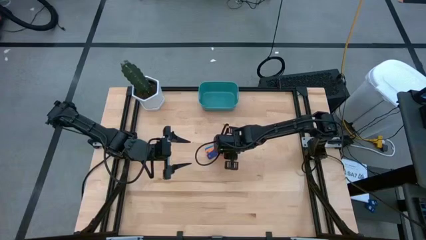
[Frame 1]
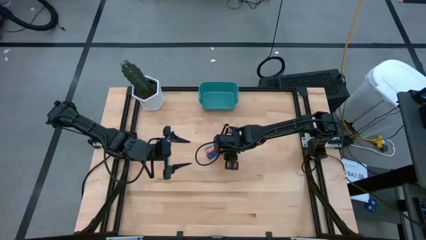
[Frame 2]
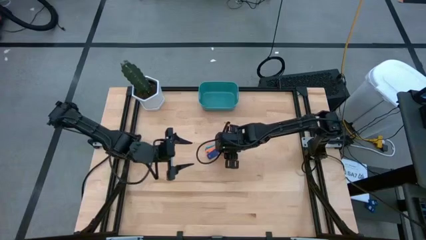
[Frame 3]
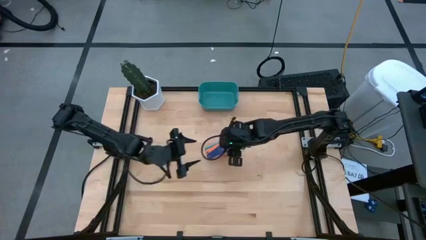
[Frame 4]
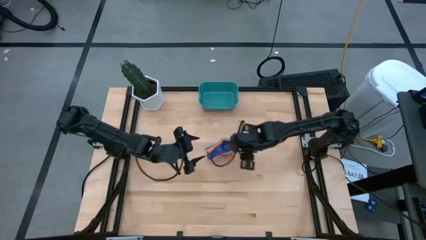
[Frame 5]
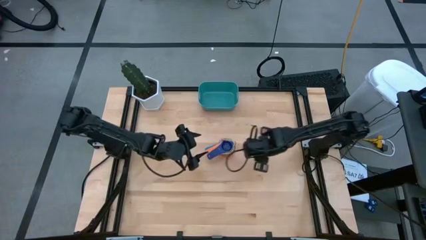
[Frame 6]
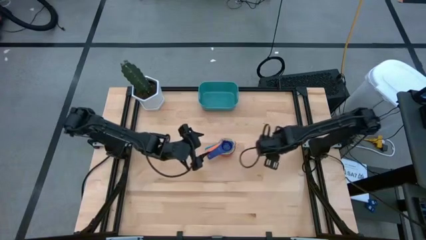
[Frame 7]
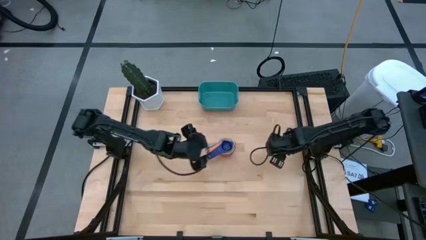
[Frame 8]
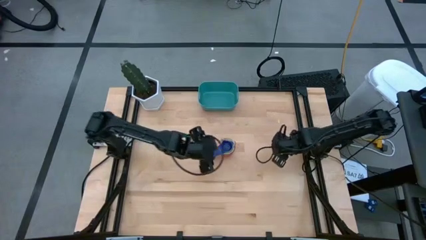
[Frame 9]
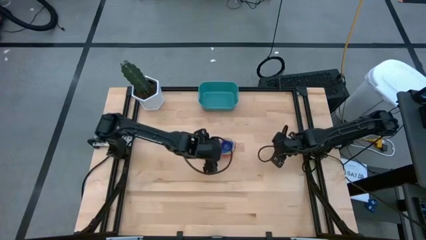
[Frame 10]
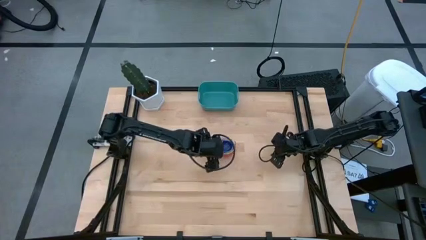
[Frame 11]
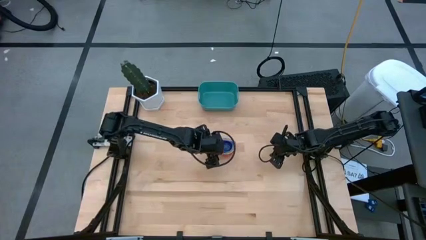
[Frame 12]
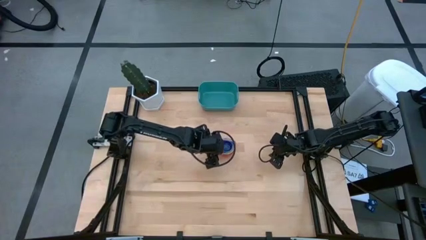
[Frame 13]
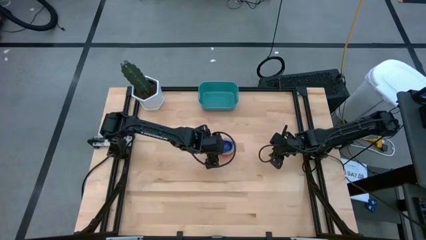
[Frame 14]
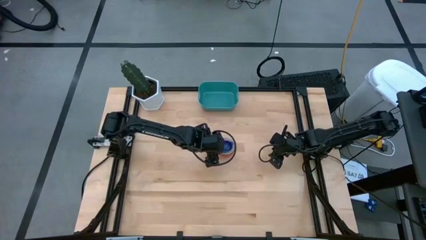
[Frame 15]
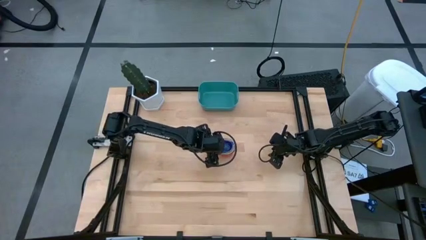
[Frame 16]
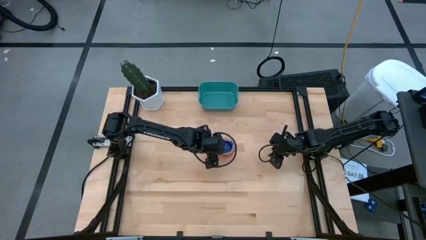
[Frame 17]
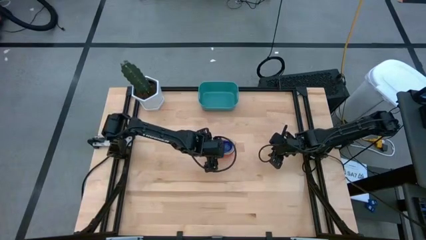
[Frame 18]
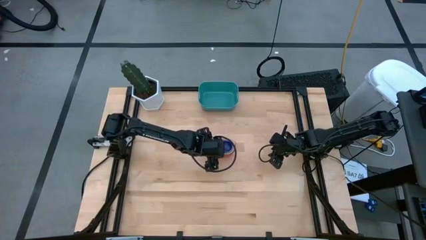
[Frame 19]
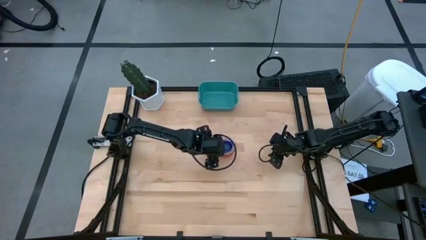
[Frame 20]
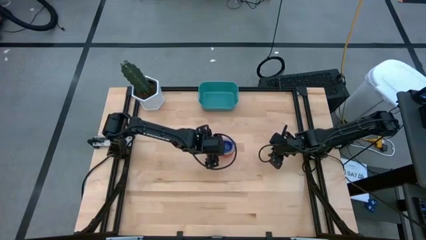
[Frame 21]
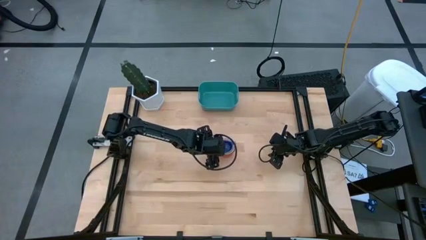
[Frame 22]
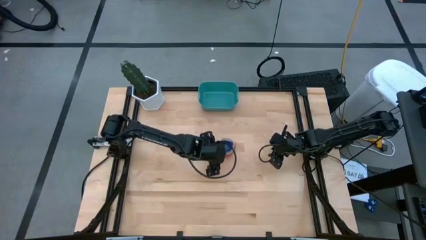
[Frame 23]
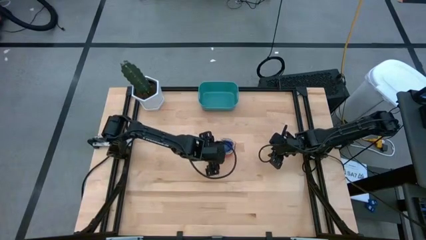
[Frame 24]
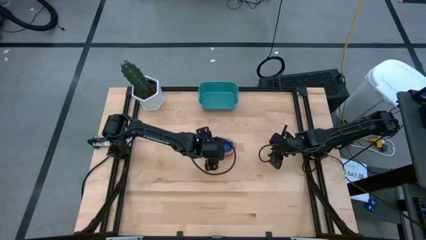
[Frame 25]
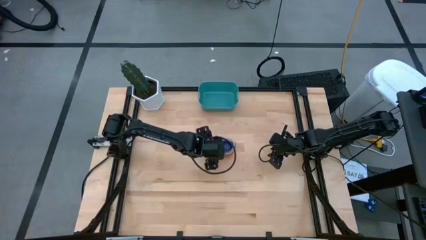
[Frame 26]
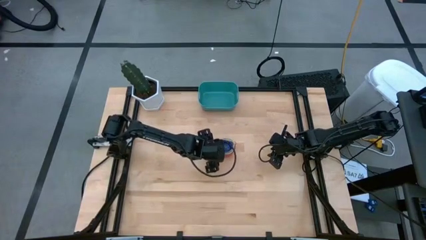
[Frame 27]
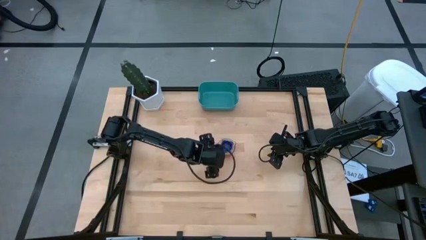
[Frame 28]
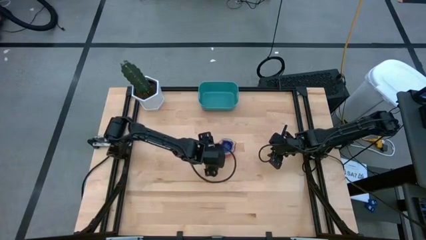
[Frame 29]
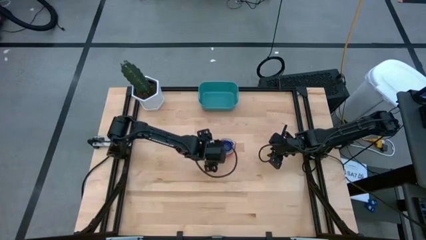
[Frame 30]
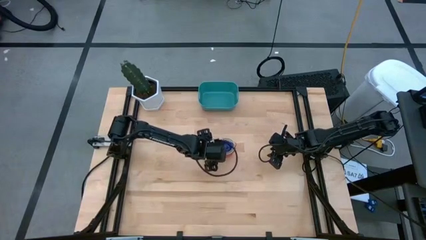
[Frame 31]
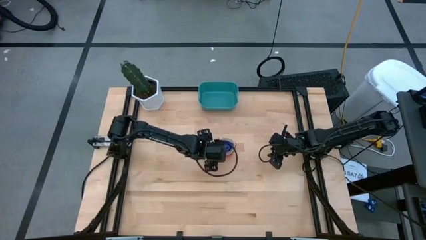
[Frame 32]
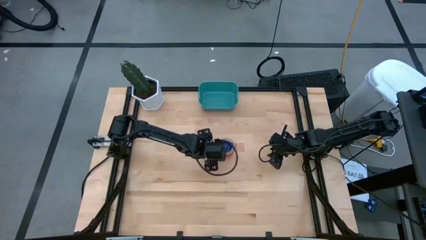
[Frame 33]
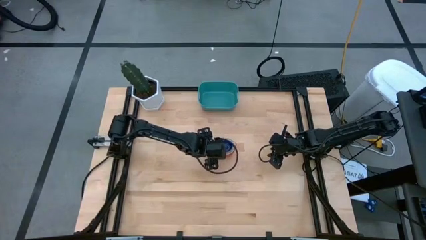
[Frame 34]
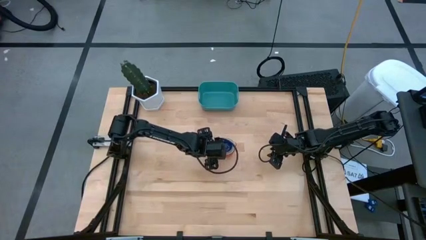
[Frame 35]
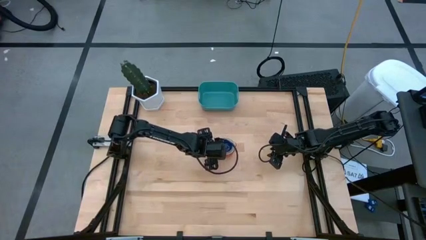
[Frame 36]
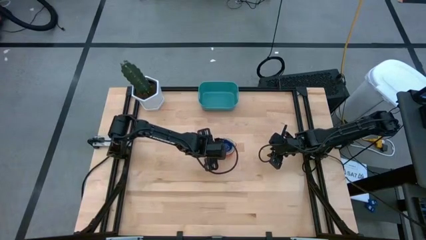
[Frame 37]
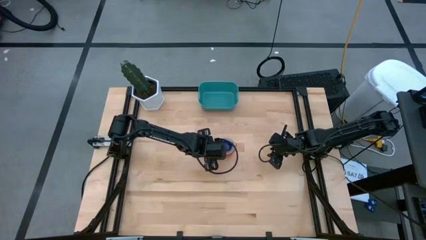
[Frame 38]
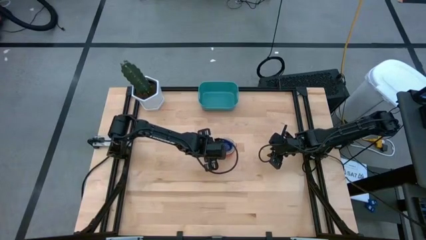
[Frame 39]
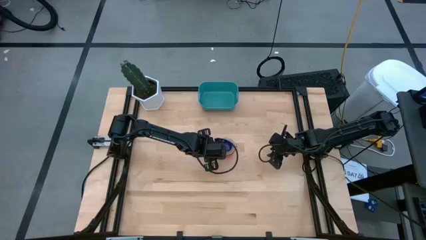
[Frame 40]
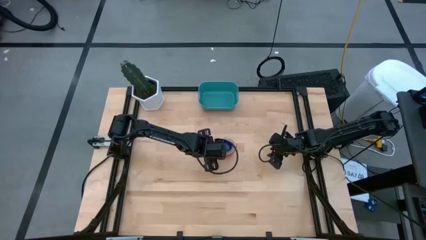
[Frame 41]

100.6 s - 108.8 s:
Task: Nest measuring cups in basket
Adjust the stacked measuring cups

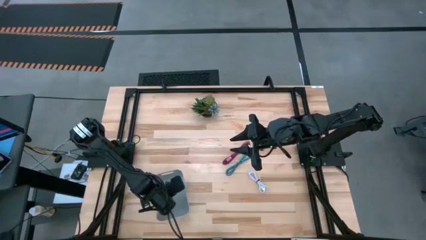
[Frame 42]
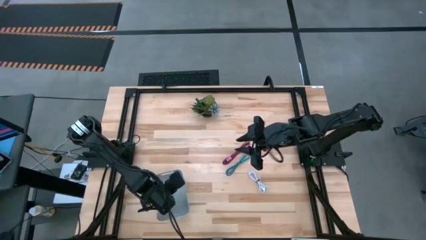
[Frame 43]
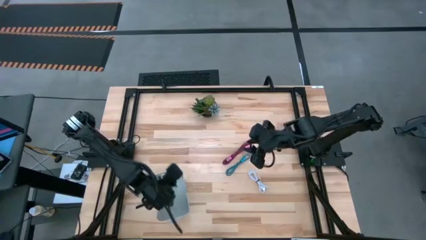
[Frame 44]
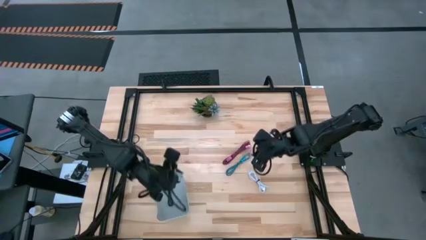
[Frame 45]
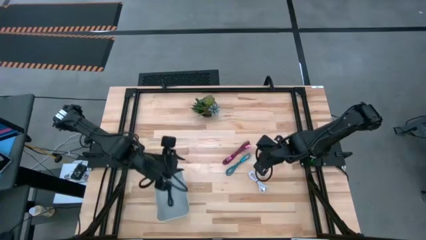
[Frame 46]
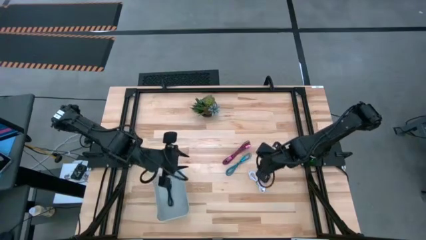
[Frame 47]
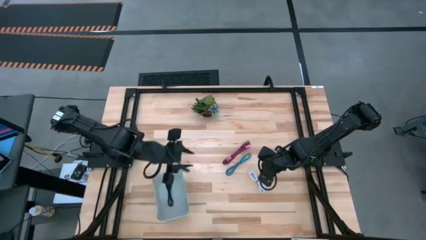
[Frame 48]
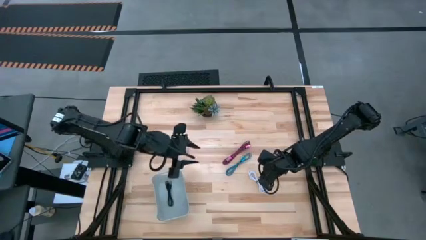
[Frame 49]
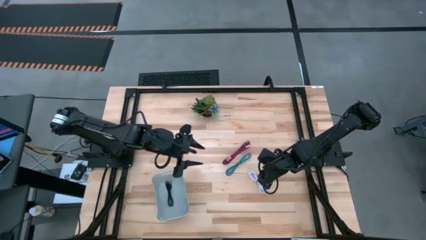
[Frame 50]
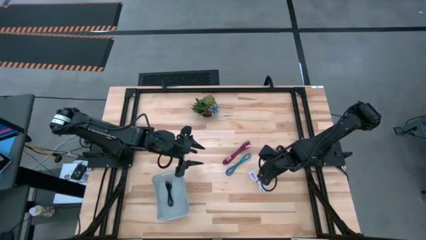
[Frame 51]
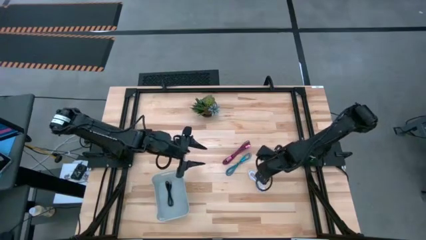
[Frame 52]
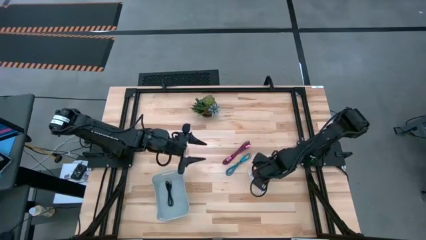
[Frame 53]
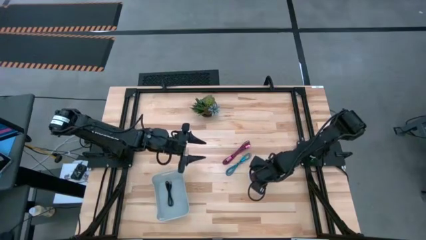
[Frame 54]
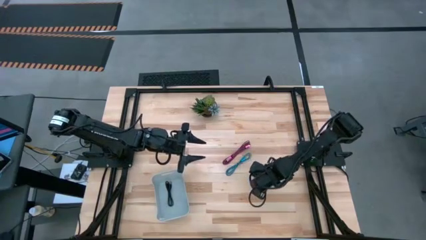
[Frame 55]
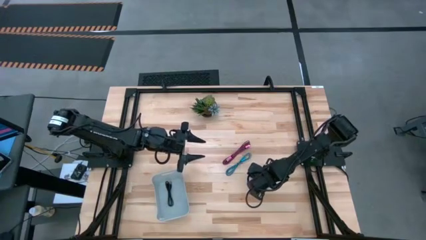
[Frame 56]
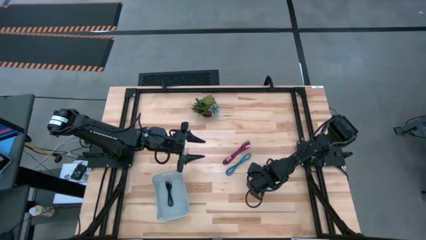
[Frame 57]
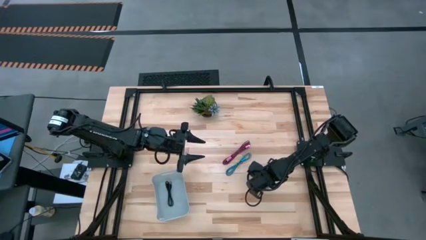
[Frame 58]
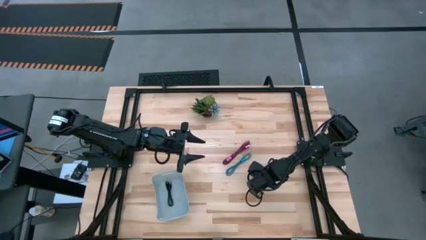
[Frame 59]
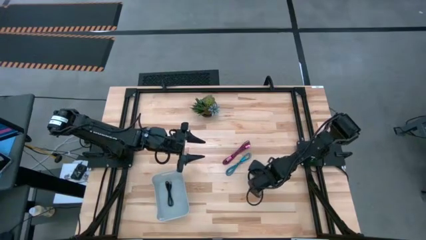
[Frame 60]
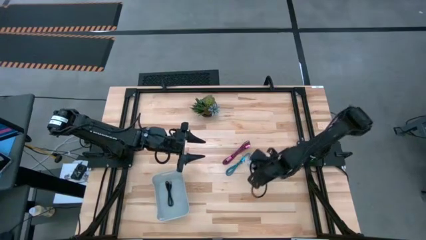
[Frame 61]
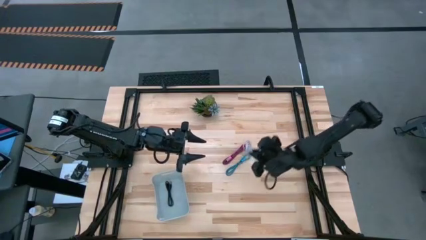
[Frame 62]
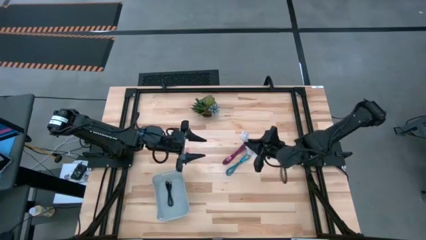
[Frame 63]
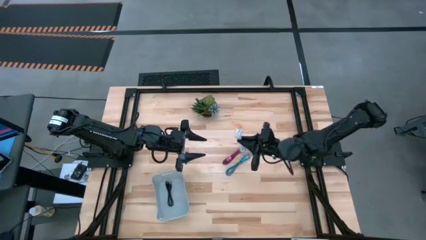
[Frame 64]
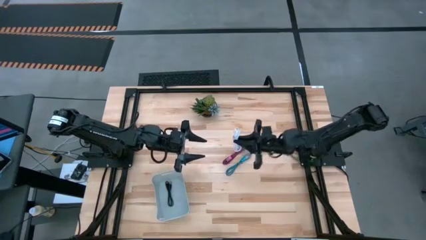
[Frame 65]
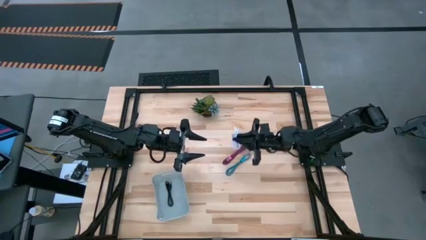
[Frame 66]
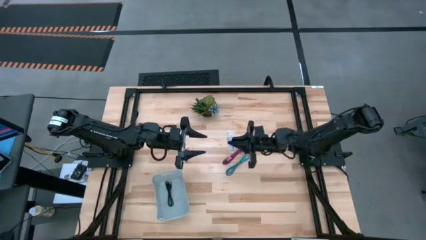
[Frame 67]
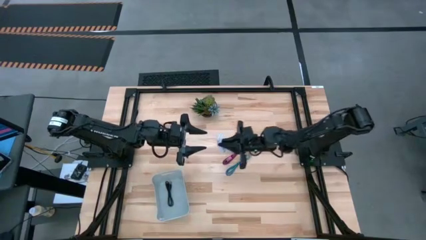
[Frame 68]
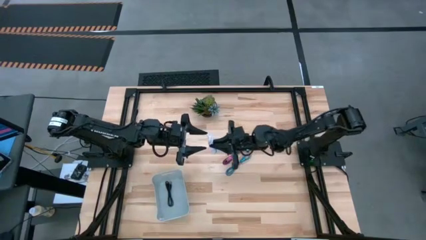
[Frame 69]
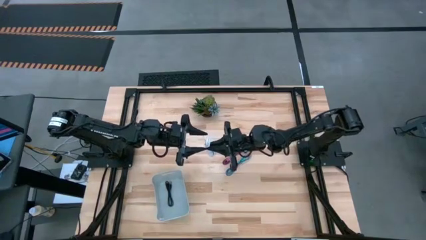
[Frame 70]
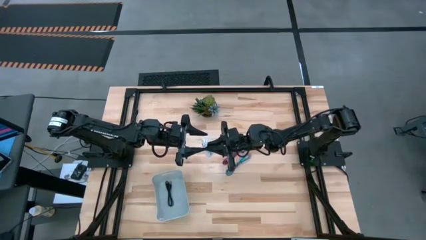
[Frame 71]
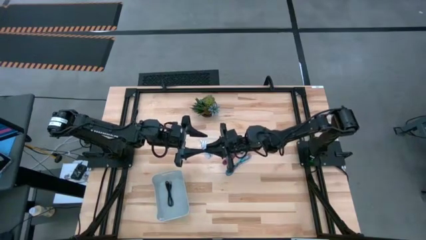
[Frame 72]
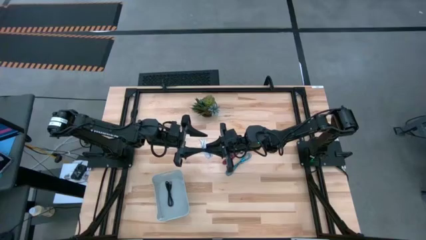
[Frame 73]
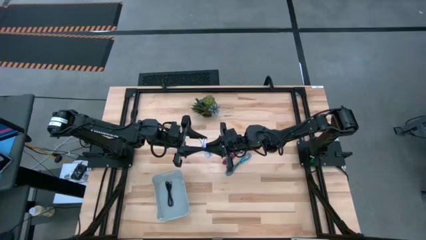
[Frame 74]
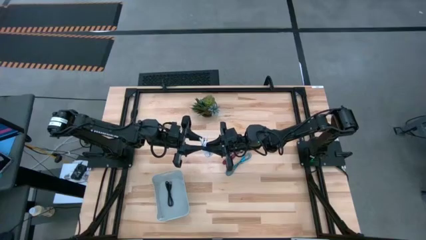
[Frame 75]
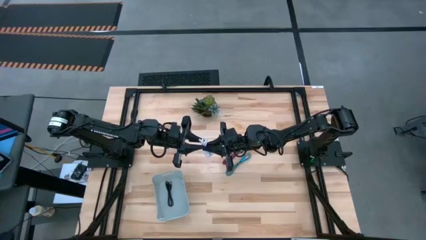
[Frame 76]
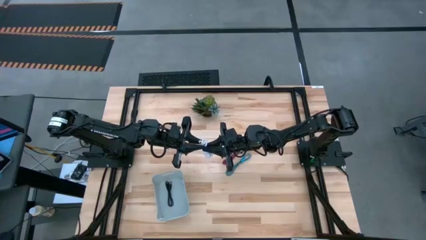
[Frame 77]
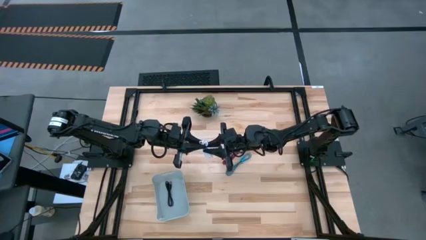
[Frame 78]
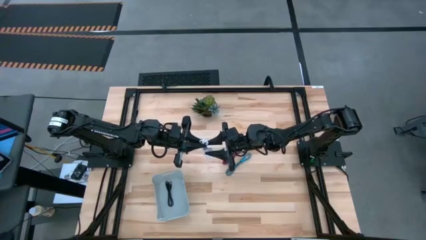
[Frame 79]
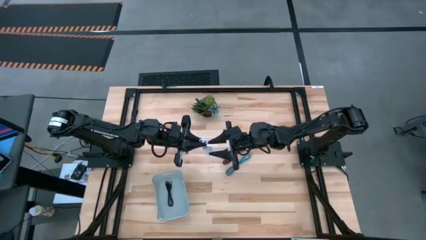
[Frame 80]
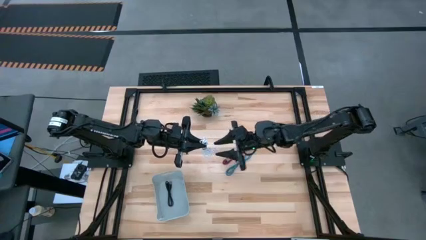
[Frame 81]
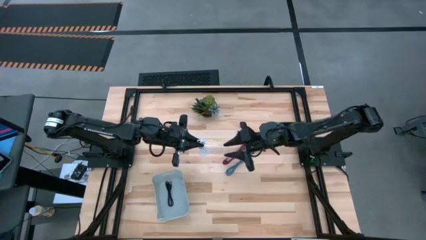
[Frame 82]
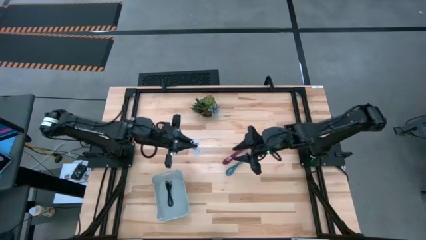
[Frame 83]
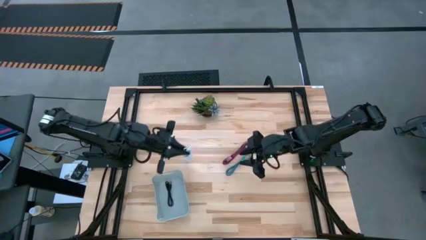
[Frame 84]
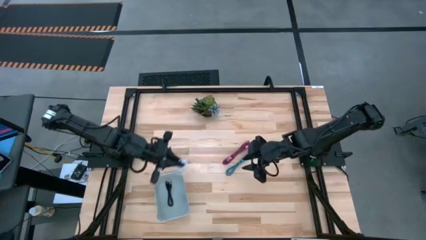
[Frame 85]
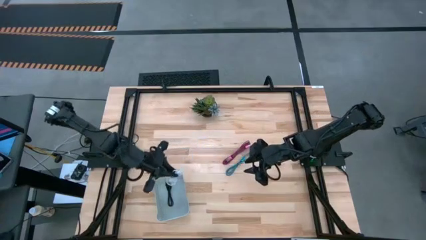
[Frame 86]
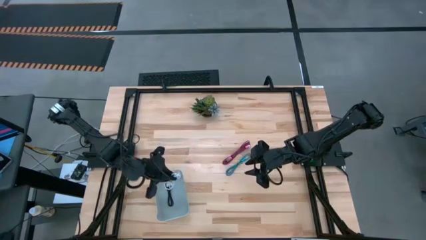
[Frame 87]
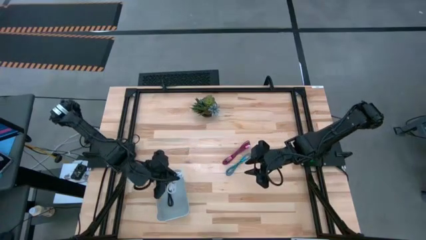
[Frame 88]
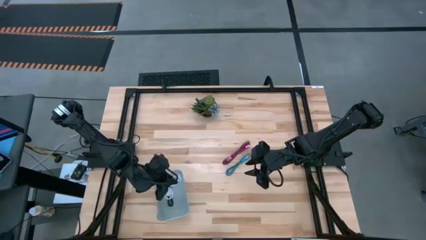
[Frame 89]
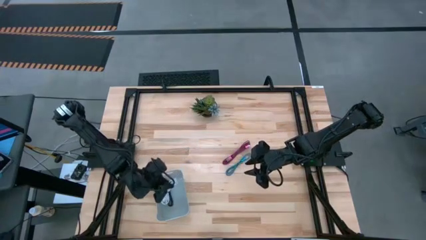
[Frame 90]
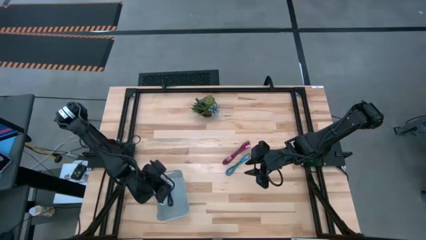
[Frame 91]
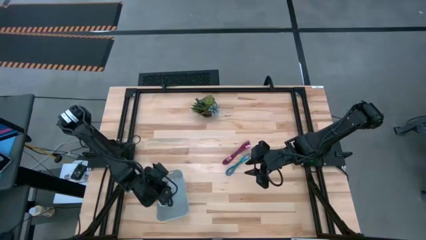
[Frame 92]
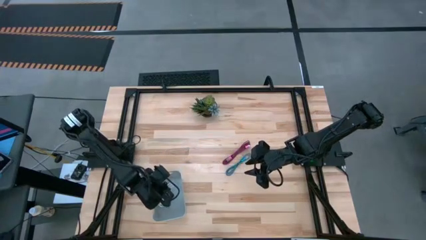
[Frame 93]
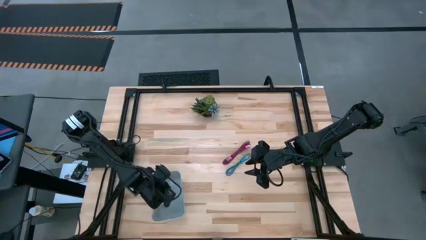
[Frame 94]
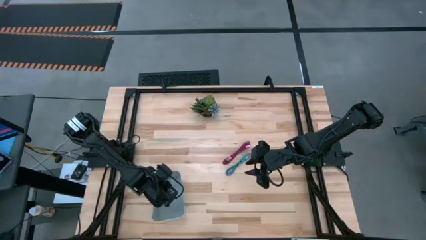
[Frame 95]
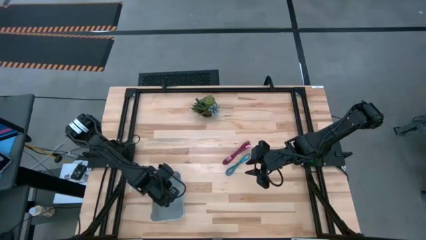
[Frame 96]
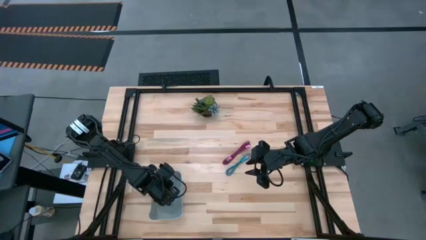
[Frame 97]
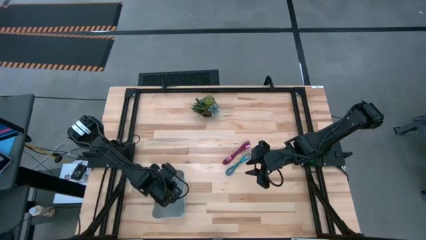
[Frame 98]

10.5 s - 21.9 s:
Task: Pick and place USB-C Cables
Put the white USB cable into the gray bin
